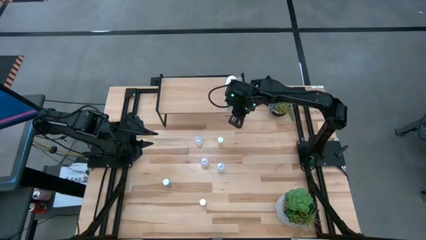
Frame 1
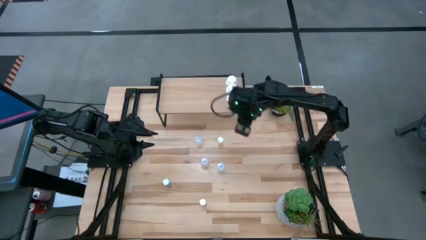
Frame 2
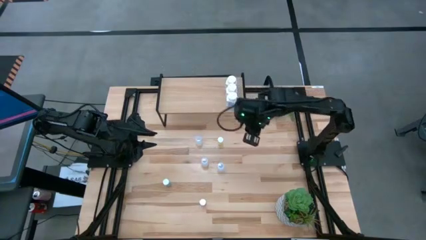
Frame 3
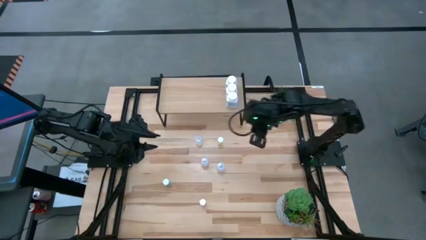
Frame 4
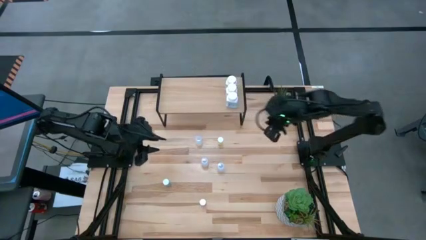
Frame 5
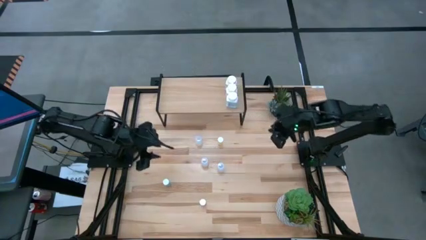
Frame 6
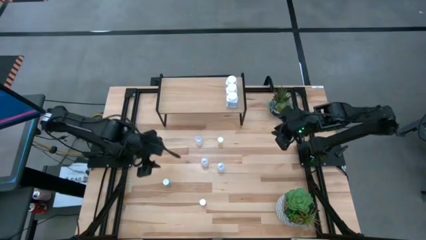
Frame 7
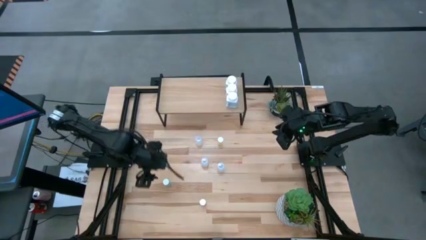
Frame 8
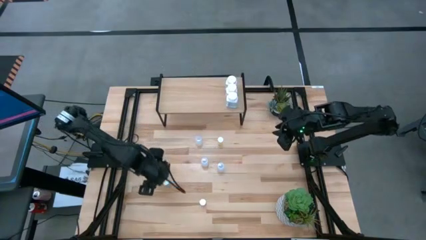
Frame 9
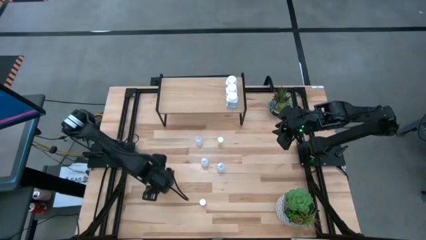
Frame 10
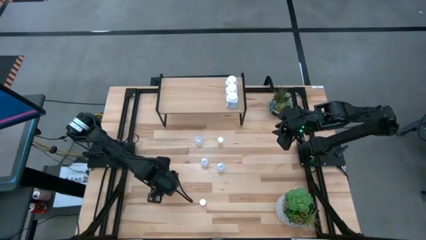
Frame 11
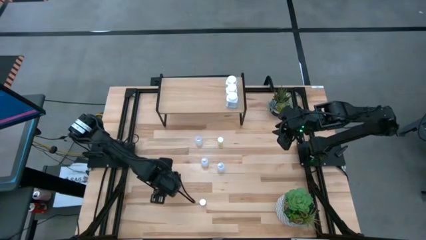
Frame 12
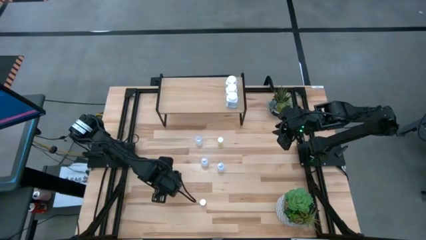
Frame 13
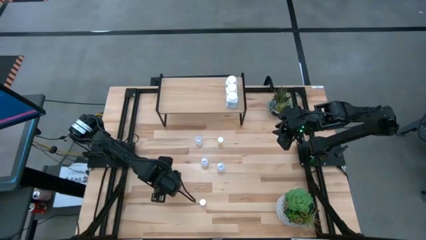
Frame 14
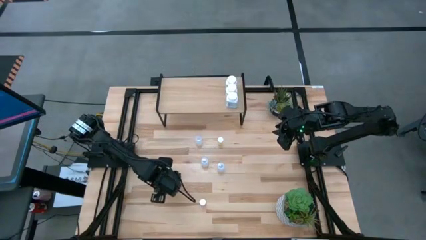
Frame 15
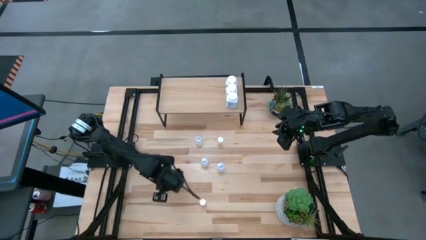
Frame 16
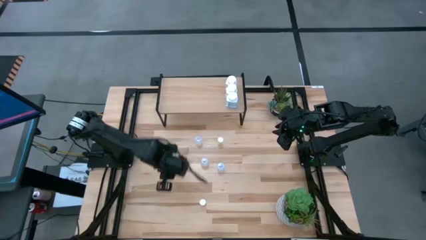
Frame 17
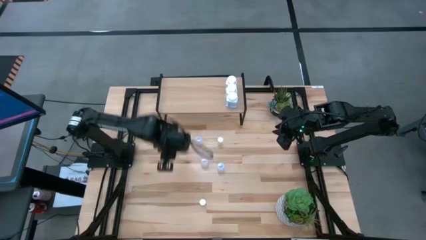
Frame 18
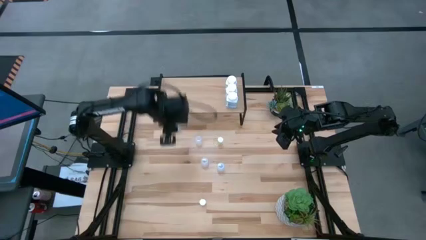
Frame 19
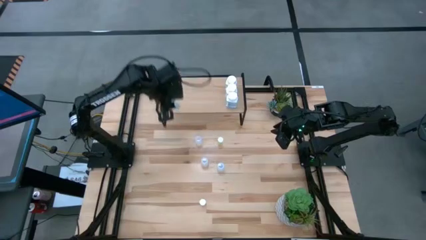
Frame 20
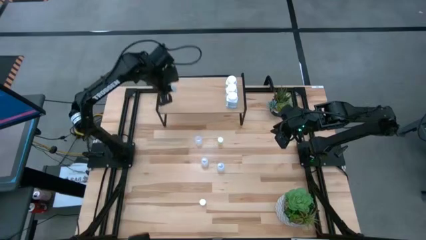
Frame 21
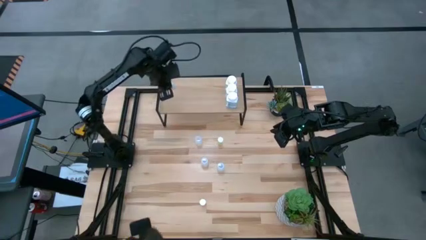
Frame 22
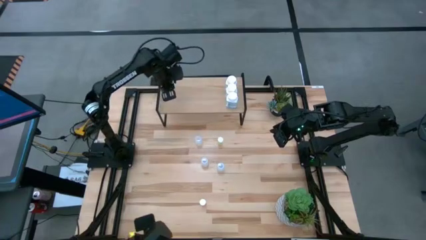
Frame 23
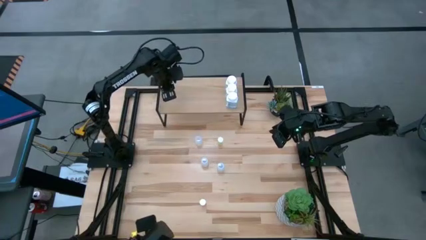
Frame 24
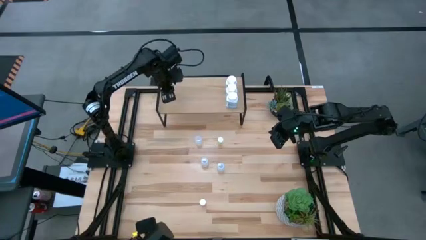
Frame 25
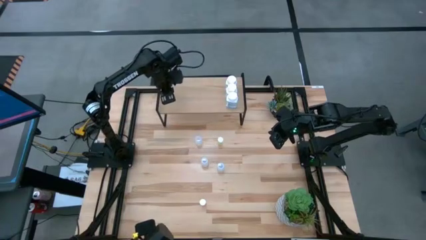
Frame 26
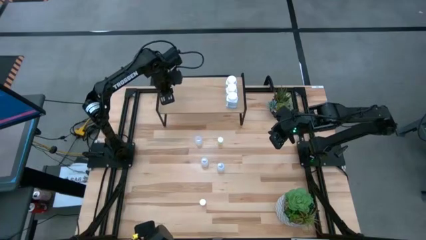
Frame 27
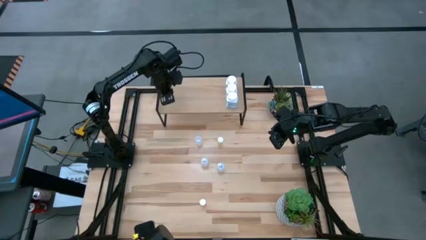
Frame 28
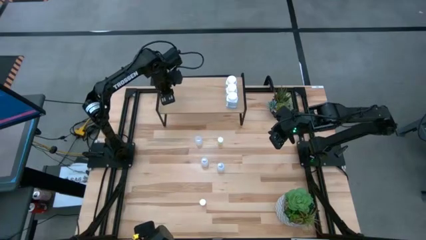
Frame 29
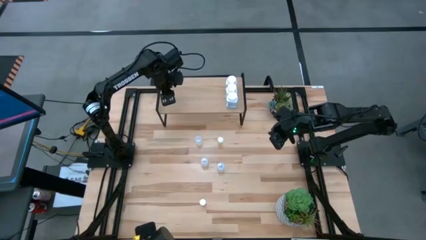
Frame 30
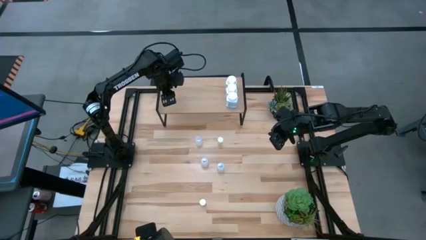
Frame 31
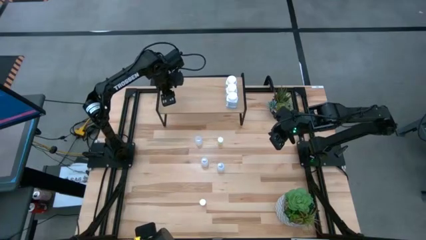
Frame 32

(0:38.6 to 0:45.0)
Task: Pick and place medicine bottles onto shelf by color
Put the small blue pill bottle on the shelf
